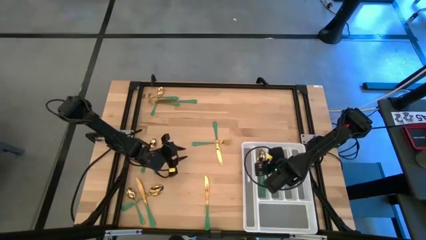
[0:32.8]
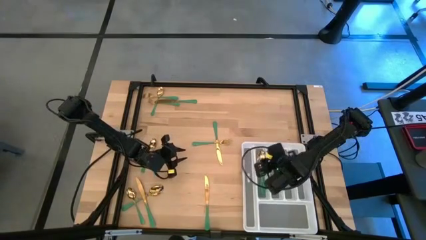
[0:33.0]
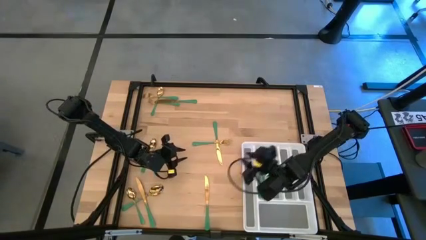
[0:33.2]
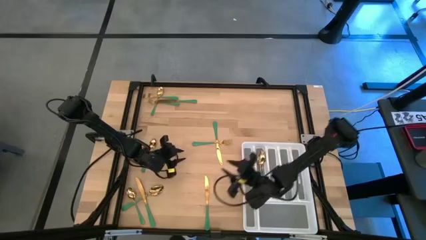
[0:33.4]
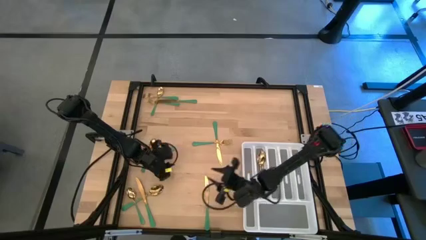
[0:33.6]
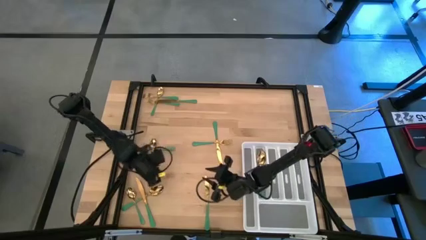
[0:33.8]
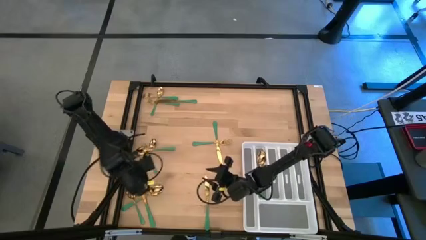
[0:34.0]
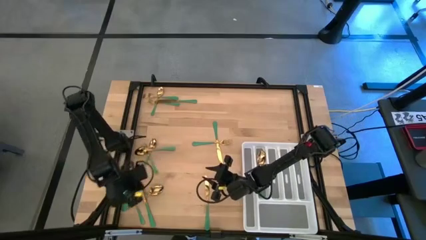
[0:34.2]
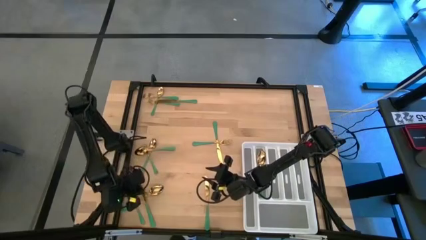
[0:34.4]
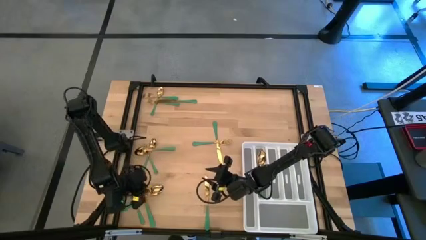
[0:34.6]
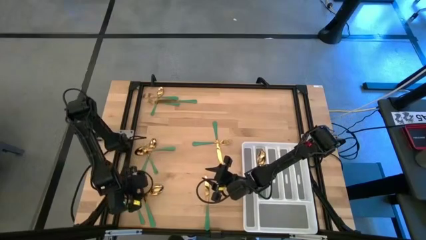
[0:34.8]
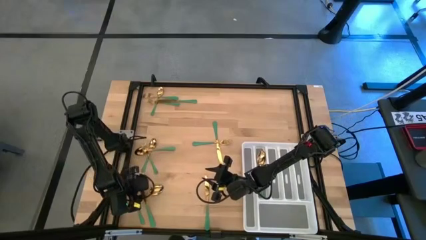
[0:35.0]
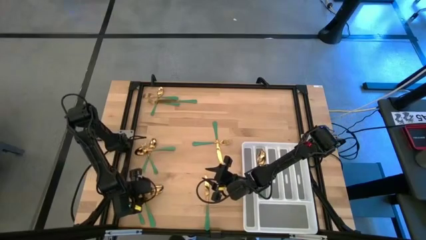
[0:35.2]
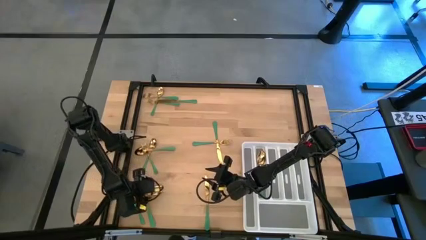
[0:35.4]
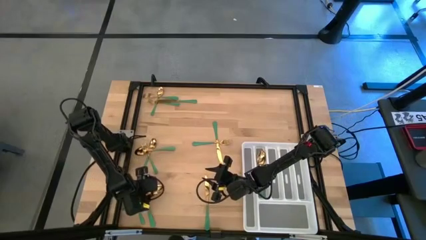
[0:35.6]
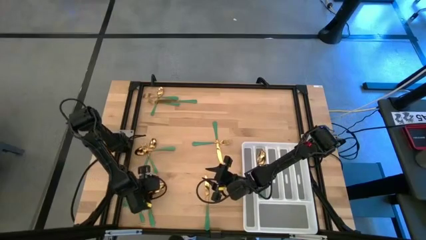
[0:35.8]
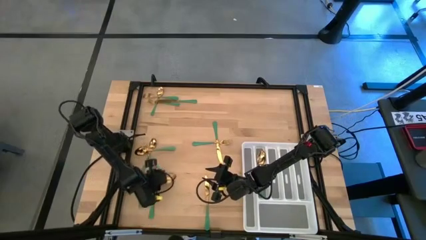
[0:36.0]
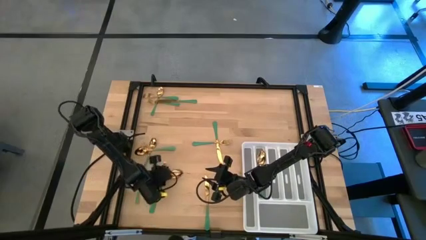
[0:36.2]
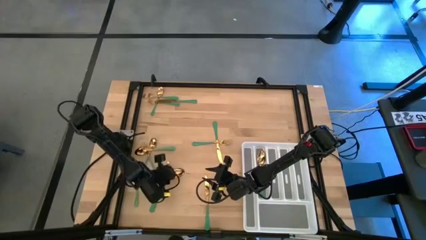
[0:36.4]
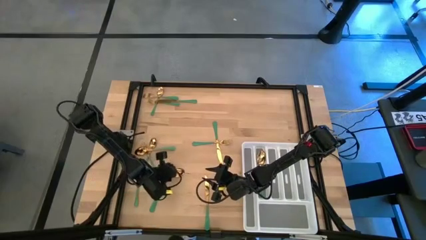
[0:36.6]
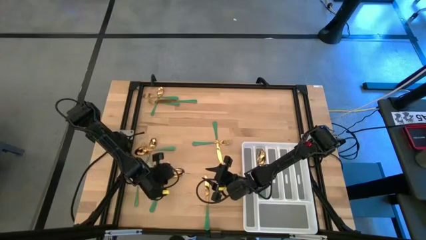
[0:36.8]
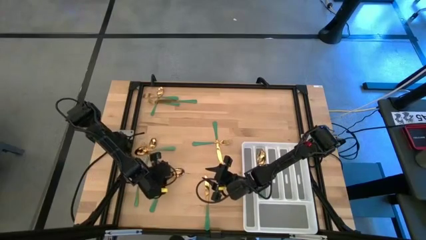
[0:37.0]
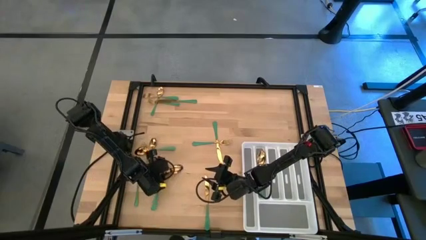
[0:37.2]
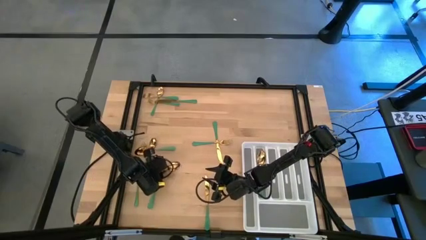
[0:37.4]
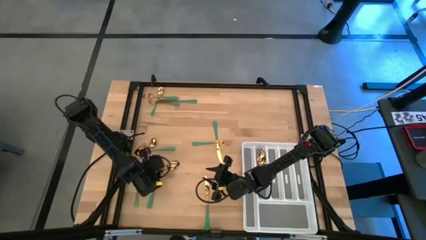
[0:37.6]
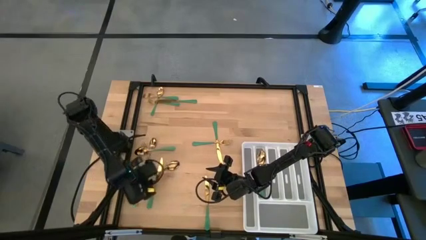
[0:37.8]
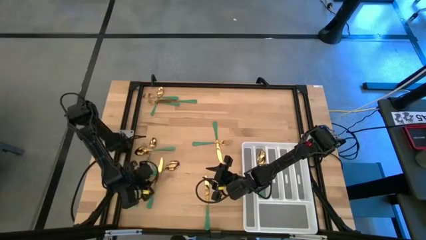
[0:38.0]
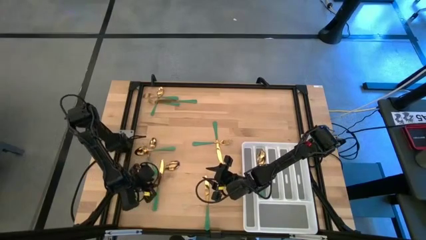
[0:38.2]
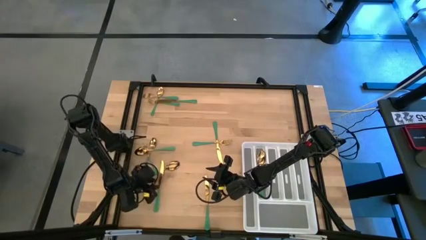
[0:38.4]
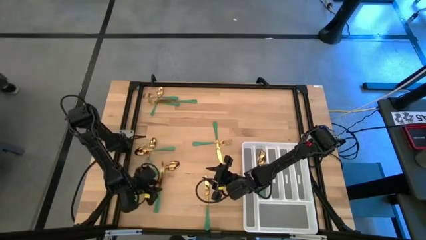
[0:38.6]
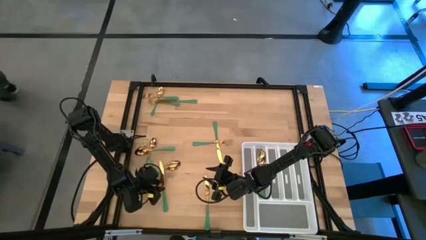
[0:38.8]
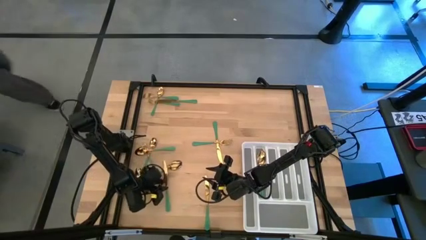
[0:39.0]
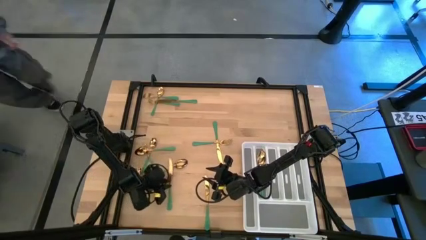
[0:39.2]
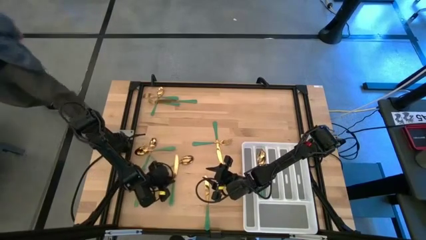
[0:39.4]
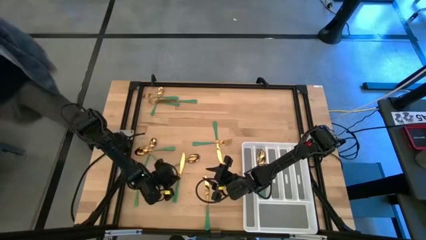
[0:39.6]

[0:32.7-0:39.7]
Task: Sort silverware
Put the bottom left green spoon into the silverware rack

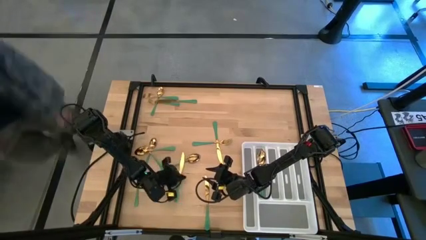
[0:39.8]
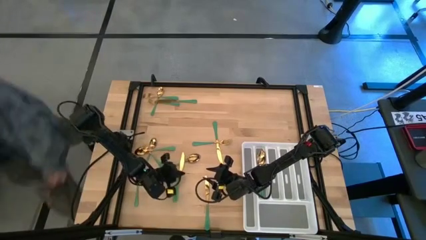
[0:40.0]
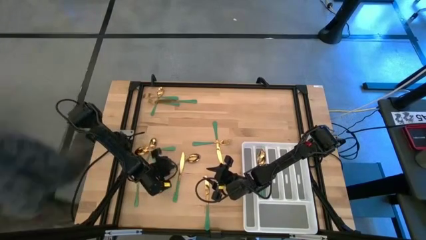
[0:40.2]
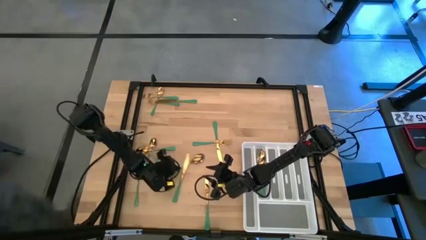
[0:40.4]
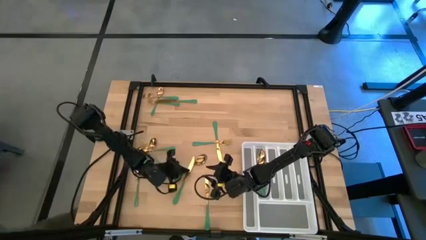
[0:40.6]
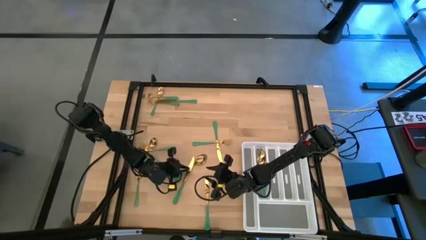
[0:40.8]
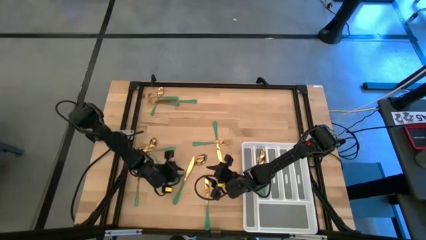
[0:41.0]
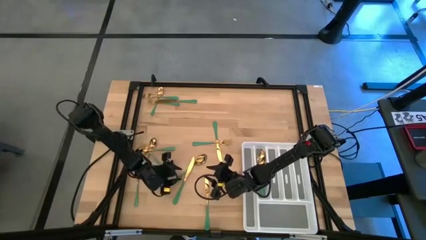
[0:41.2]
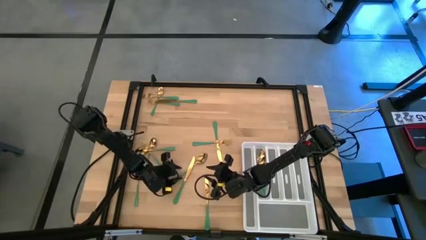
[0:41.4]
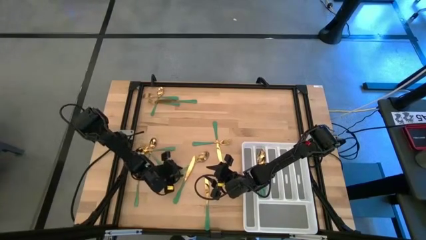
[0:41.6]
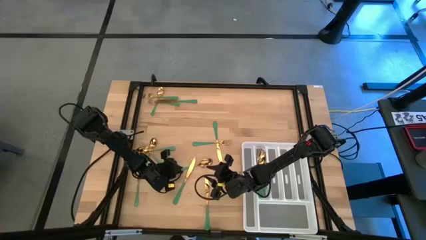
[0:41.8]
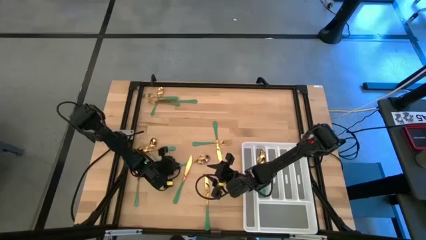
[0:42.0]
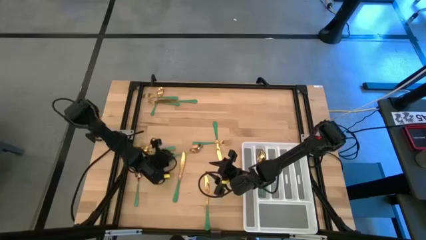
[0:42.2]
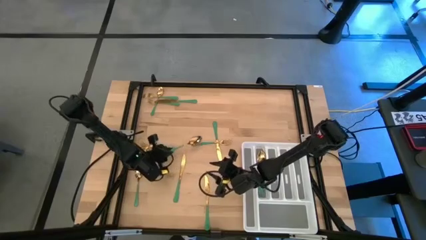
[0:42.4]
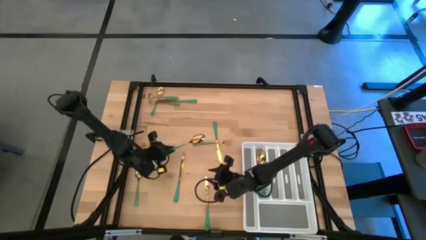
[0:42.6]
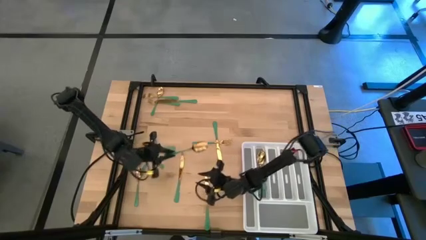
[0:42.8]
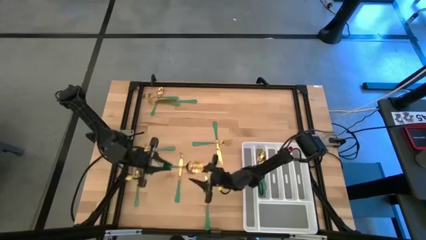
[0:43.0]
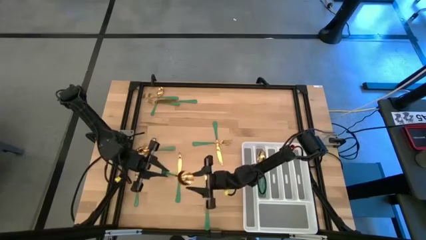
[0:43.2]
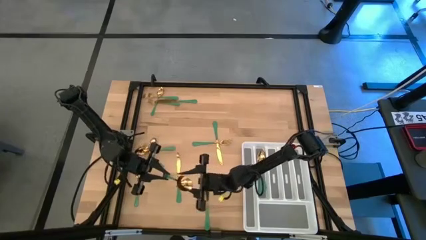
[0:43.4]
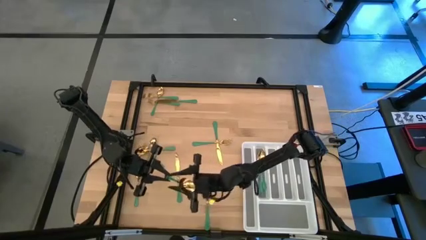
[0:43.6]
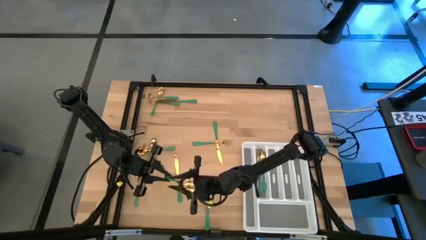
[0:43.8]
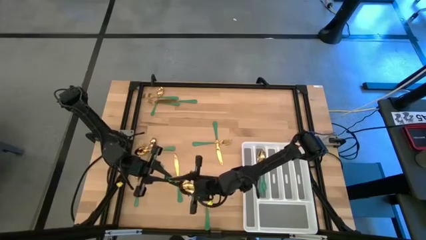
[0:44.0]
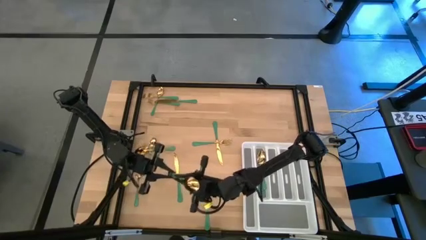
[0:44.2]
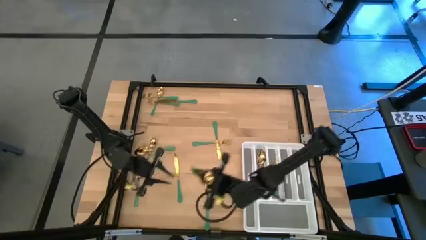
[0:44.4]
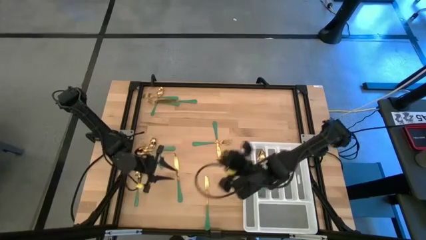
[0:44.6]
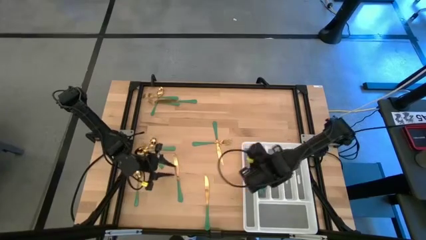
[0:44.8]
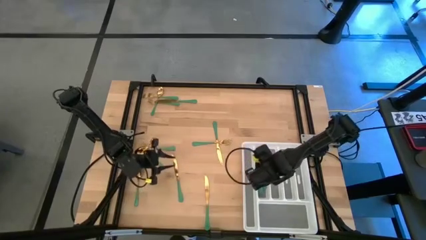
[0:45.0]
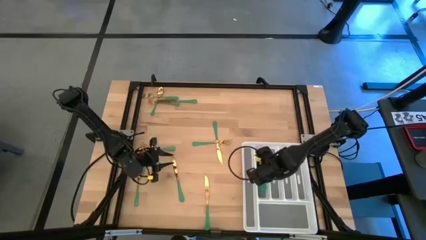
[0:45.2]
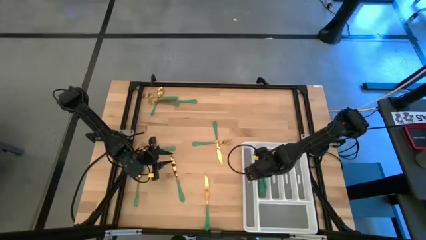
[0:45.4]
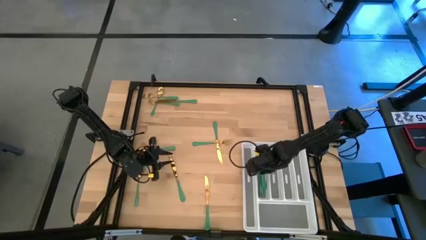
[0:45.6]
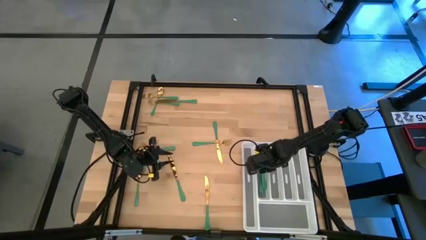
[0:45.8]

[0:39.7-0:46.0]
Put the bottom left green spoon into the silverware rack
